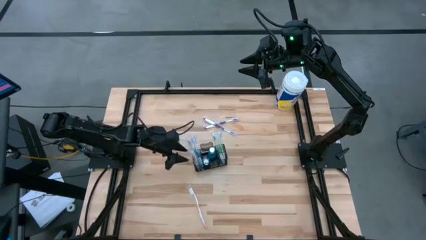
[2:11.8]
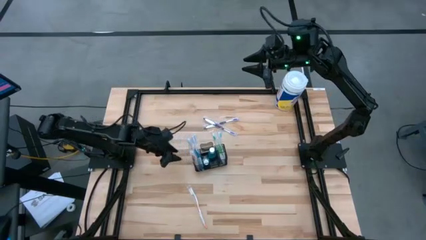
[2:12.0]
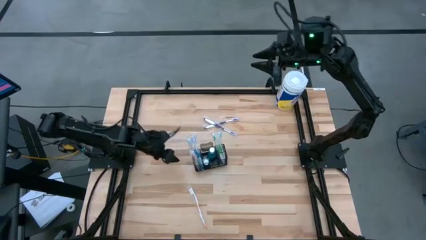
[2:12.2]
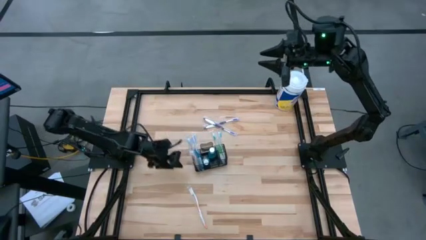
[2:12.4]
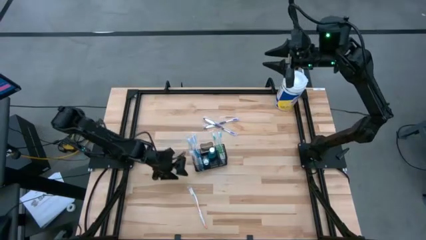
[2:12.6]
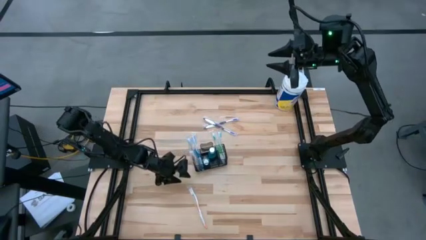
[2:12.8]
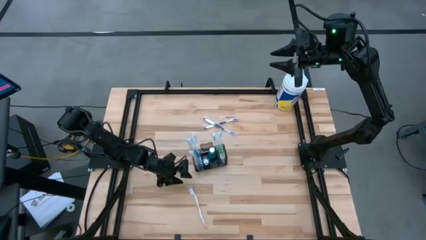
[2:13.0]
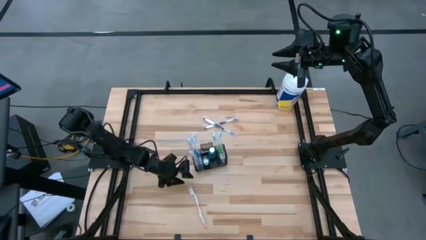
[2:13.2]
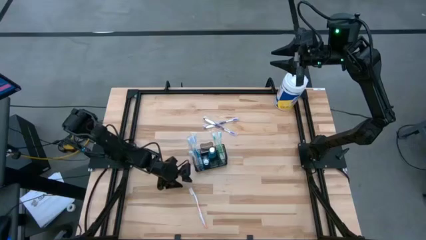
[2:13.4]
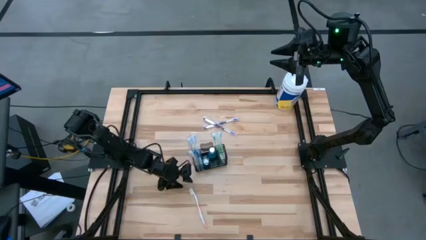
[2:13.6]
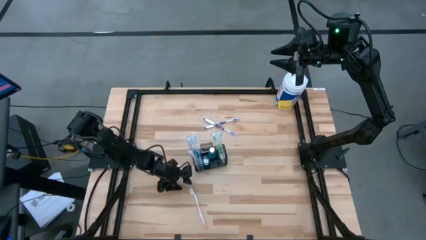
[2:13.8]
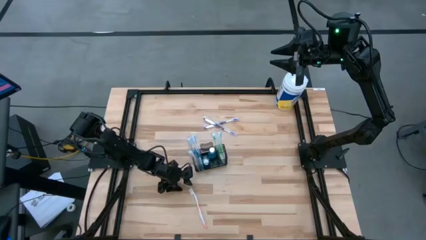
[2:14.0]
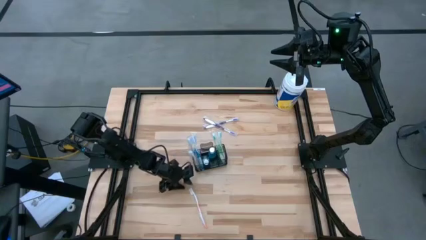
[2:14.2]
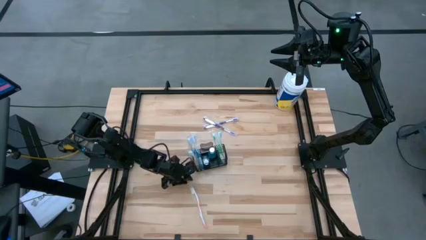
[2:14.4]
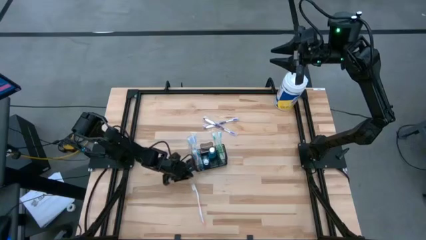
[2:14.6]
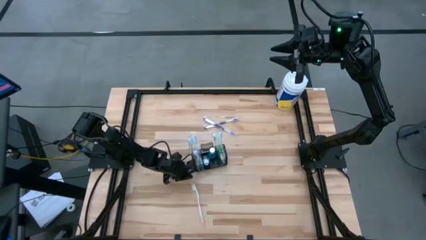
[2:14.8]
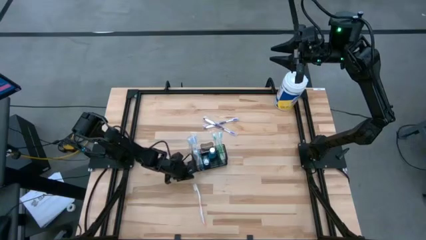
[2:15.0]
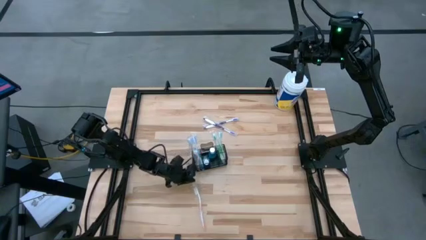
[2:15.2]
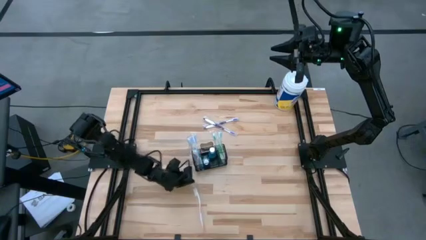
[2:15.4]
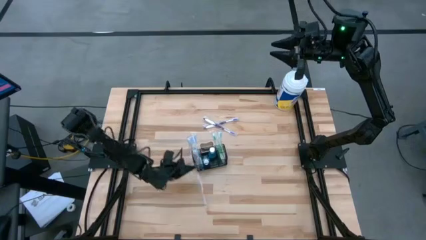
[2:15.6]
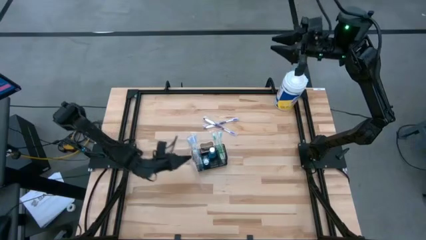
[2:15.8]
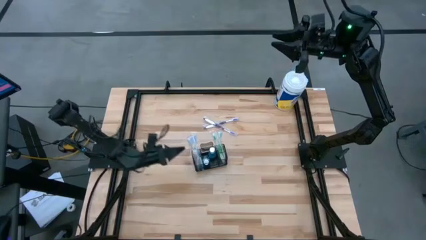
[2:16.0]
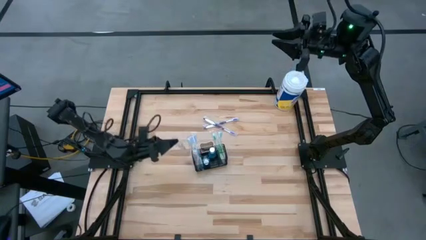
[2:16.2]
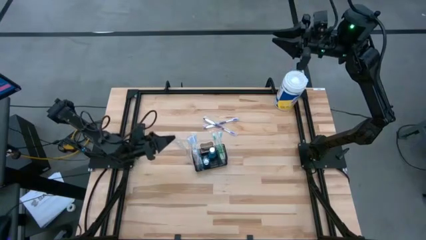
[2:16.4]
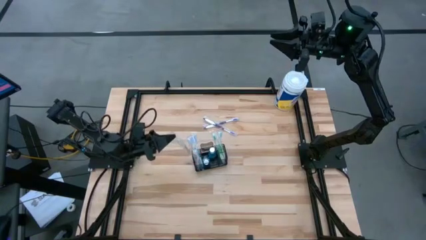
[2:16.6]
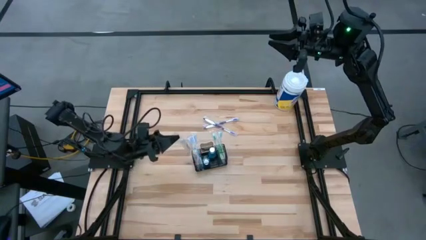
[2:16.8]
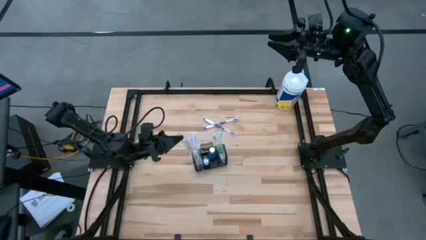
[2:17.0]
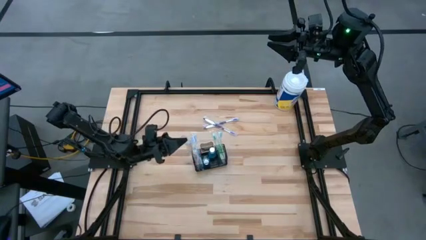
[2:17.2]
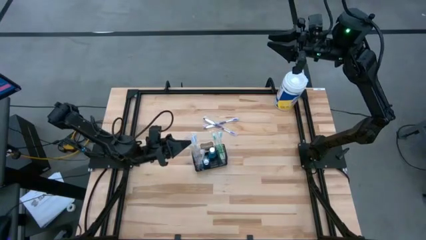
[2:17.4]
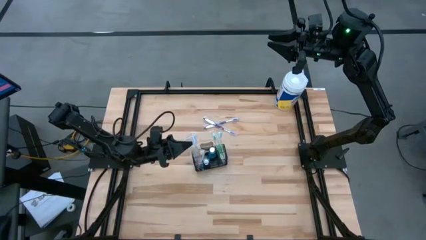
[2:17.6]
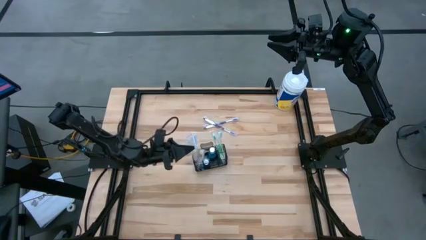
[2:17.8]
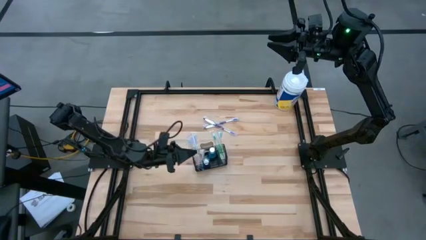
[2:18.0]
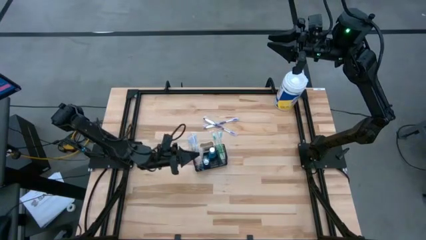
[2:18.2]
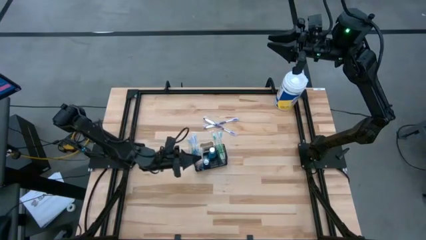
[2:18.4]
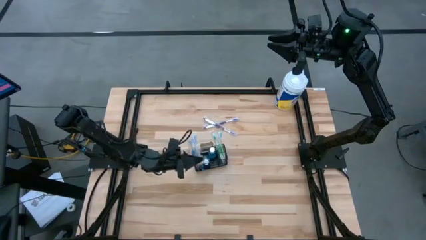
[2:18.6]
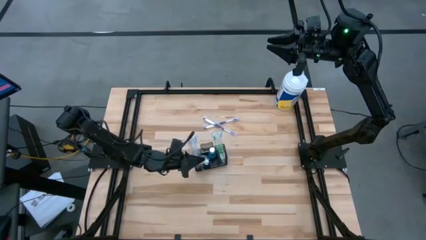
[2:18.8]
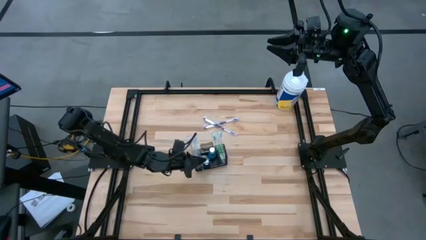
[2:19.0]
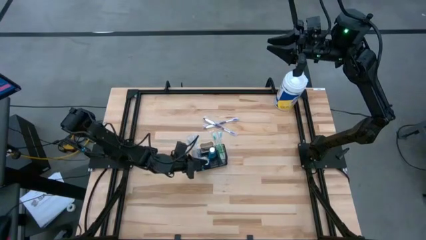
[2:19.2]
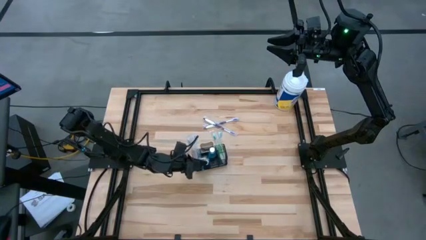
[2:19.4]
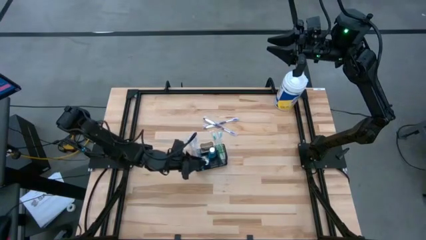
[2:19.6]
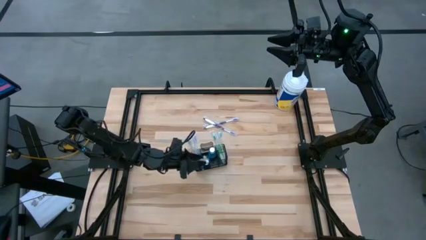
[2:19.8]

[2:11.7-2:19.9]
Task: Pick & Place toothbrushing station
Put the orange toothbrush into the mesh organizer

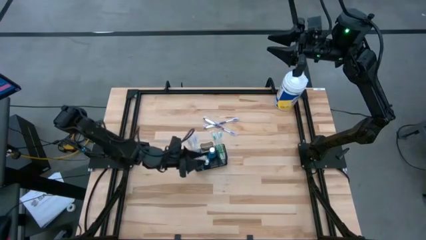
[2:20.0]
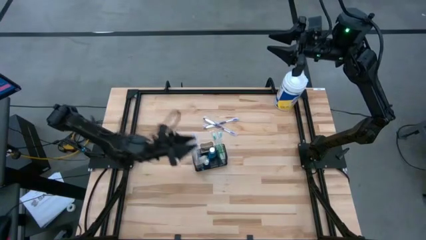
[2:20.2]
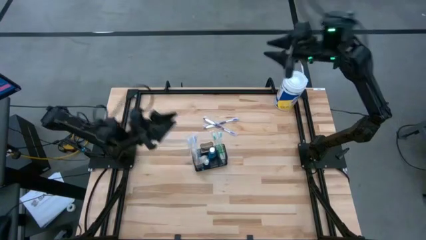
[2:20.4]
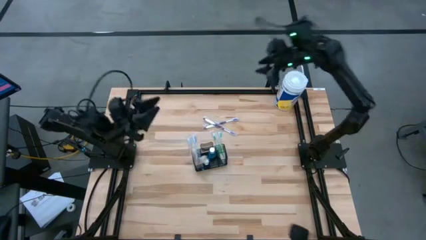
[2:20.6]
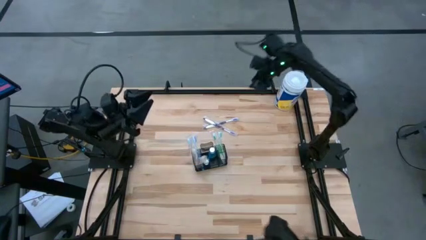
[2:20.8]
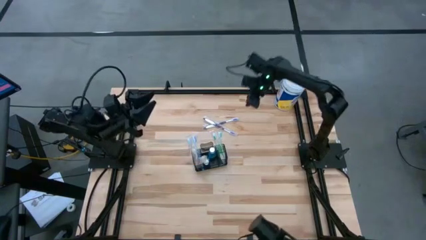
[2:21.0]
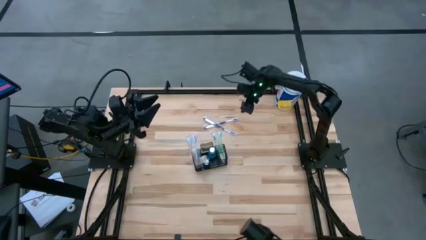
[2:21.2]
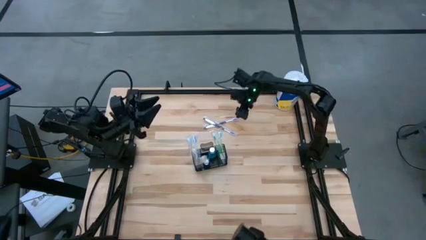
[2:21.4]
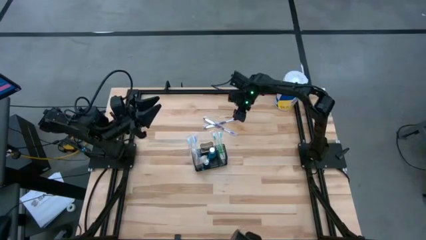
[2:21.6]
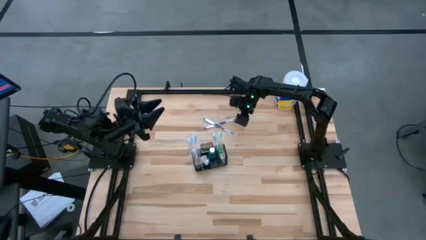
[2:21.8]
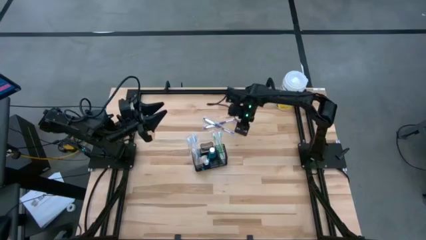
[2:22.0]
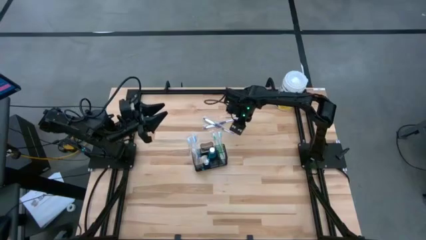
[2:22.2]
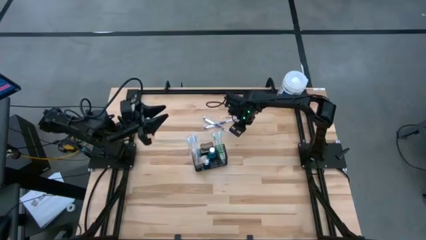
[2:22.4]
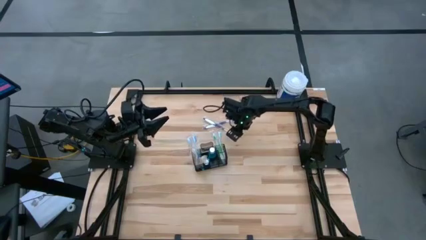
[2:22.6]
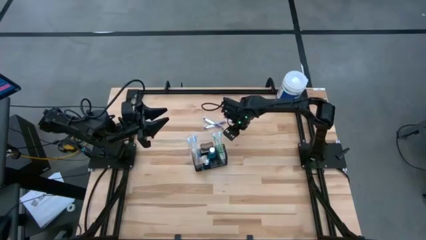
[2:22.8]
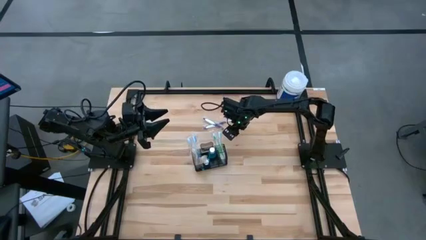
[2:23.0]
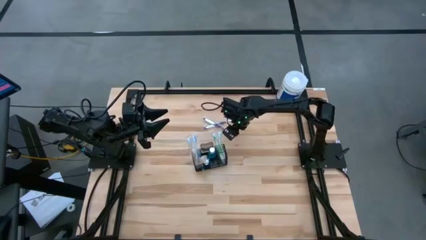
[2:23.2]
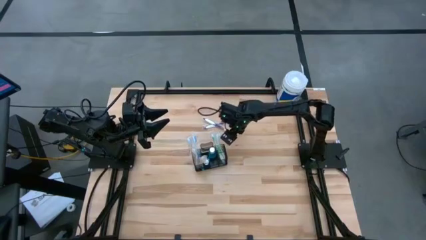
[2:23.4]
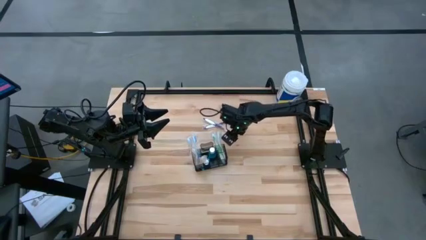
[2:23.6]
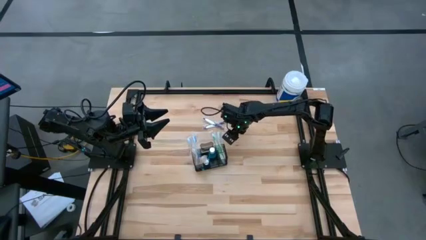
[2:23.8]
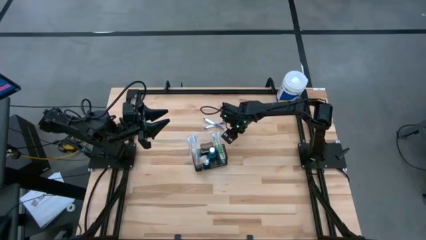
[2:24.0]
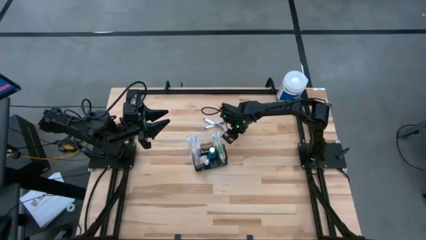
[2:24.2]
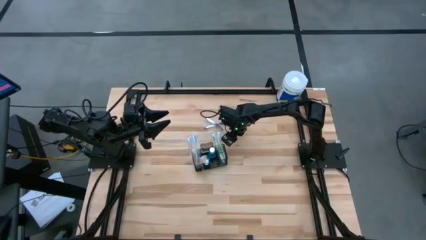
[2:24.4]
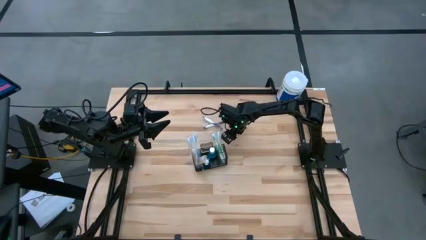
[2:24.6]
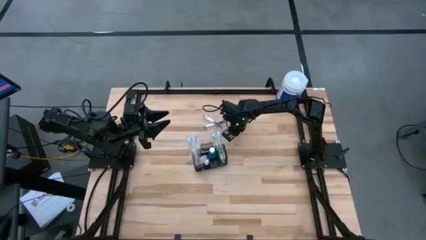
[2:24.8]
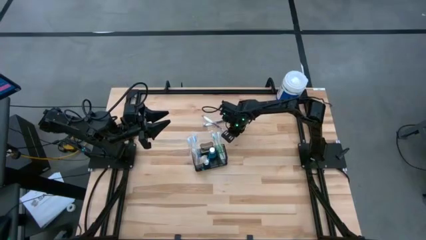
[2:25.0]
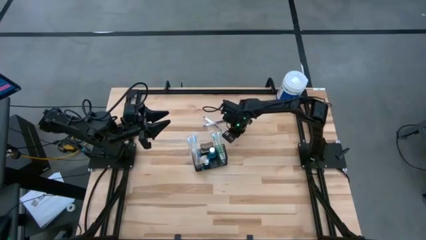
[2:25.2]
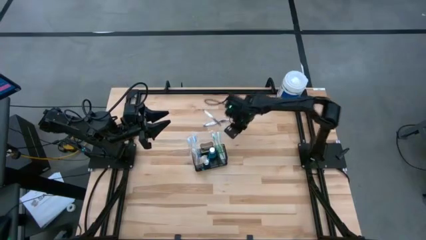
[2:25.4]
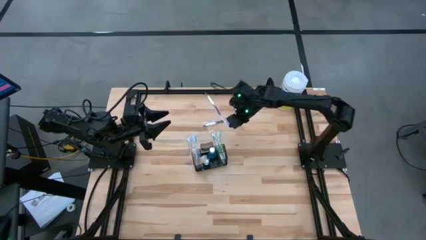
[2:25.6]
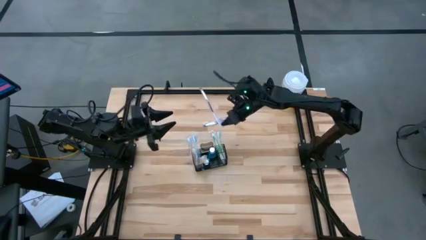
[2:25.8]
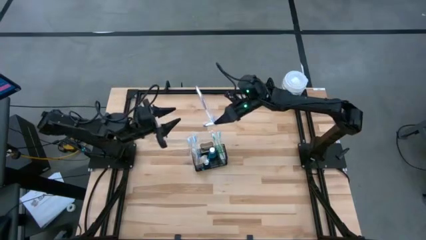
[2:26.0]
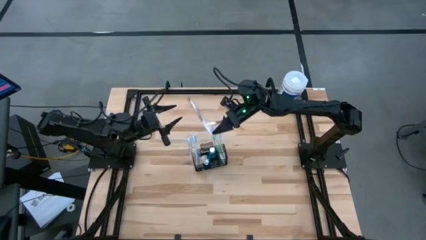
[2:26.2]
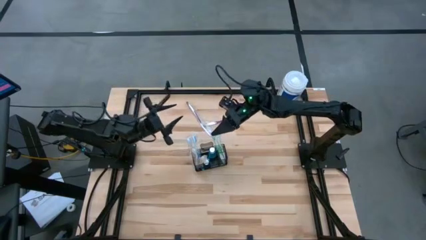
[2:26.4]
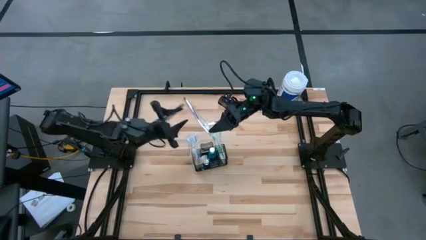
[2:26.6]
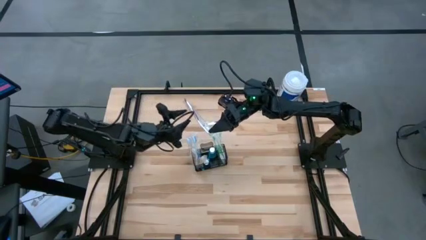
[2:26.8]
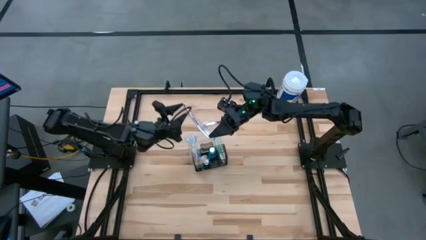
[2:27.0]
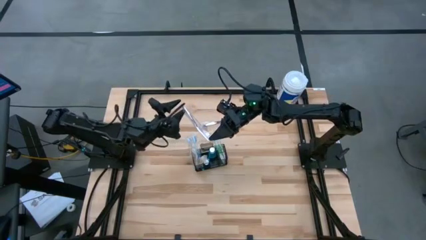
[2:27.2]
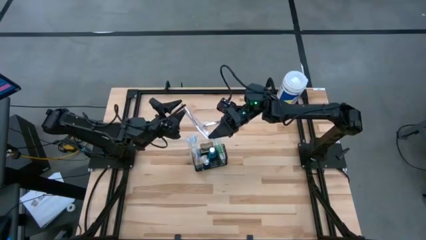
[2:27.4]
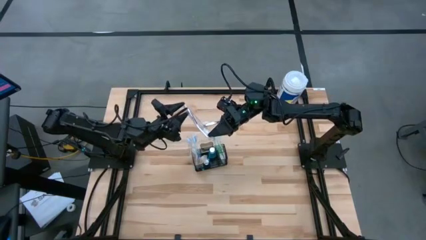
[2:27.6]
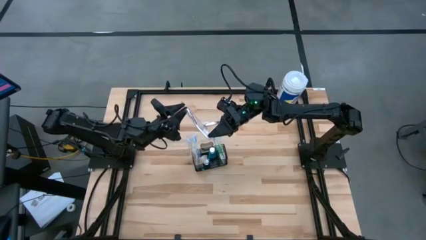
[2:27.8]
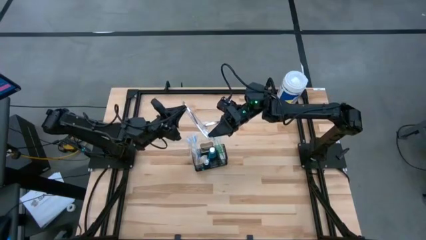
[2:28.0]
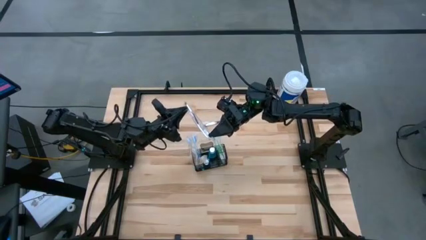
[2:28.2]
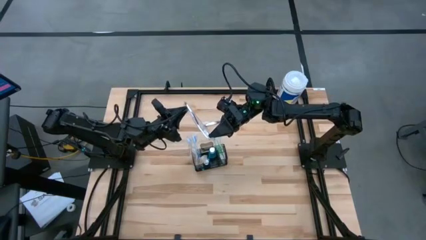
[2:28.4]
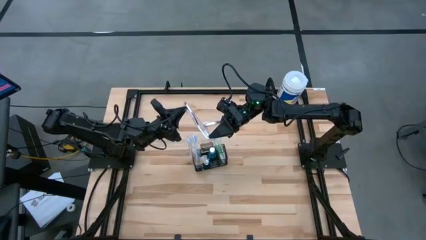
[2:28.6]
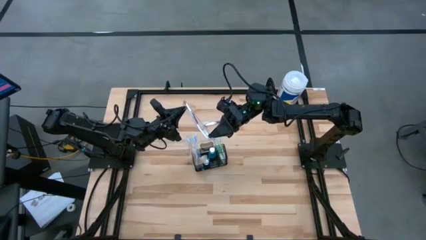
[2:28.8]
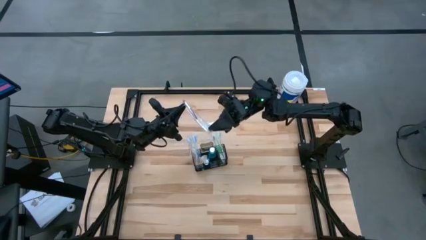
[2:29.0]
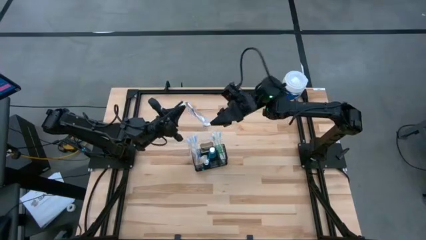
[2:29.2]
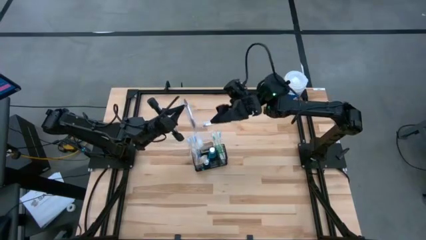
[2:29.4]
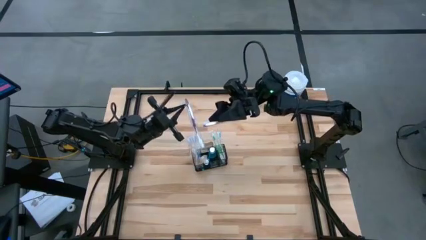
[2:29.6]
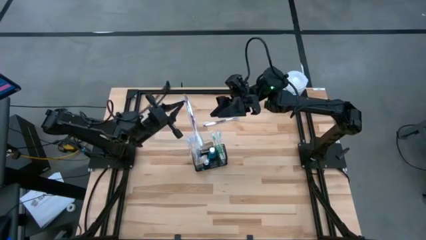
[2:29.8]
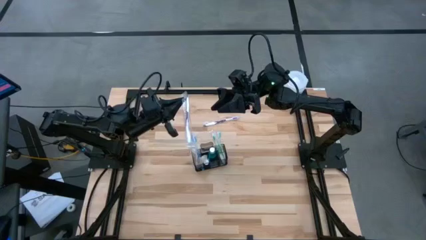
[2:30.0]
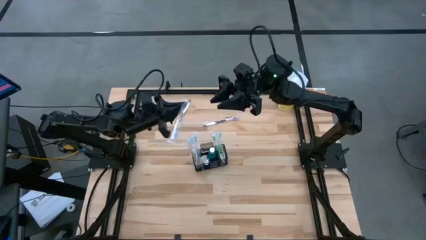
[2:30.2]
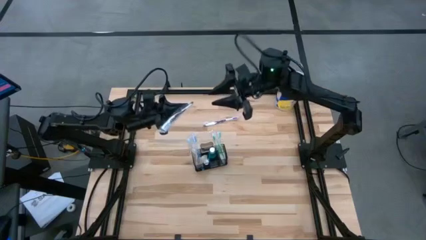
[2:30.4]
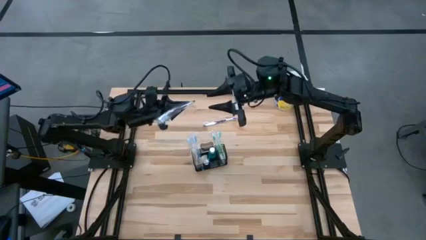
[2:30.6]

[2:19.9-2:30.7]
Put the bottom purple toothbrush into the mesh organizer
